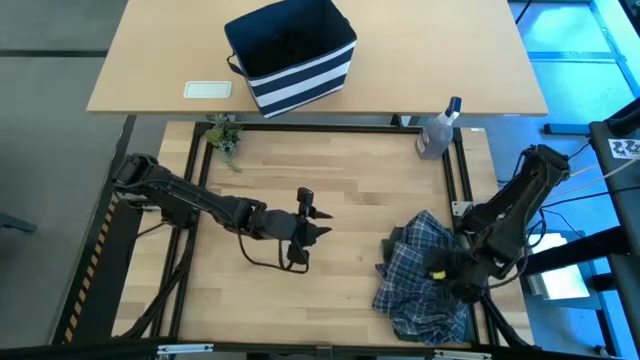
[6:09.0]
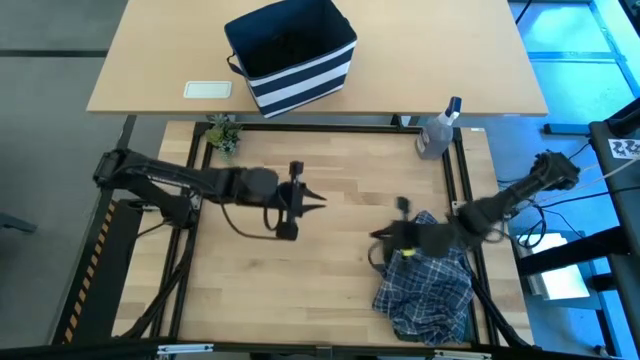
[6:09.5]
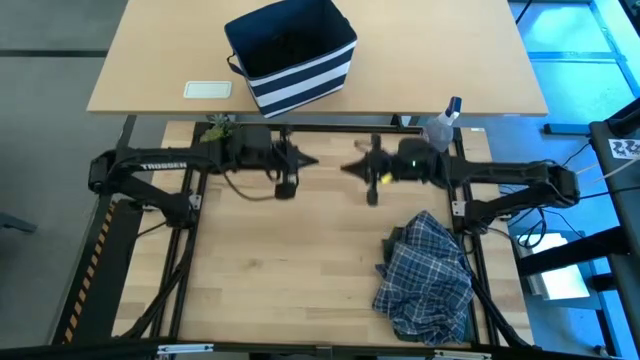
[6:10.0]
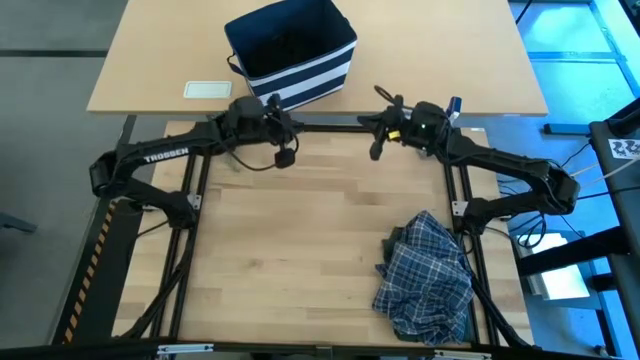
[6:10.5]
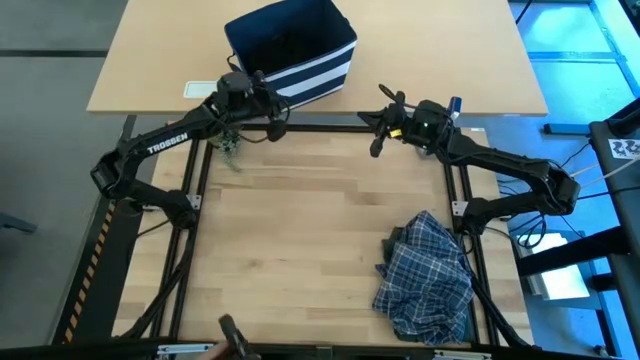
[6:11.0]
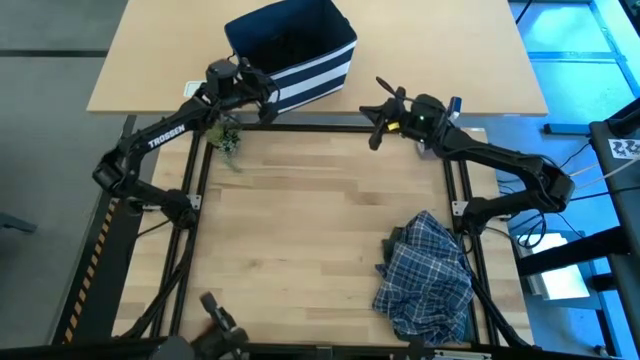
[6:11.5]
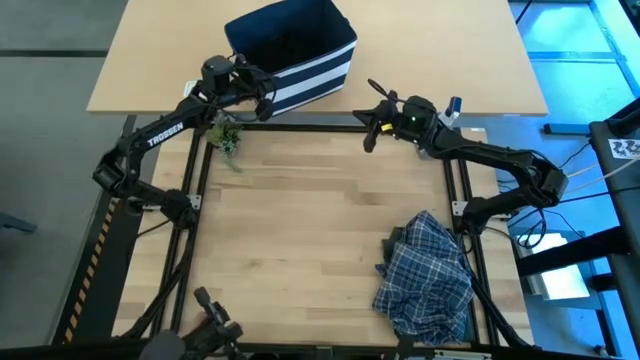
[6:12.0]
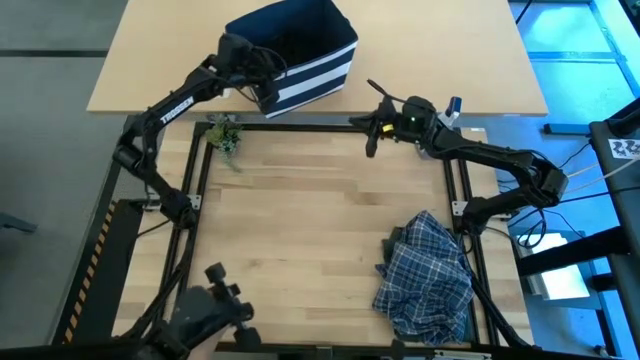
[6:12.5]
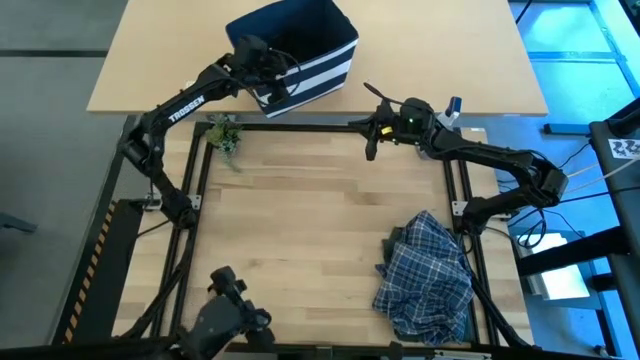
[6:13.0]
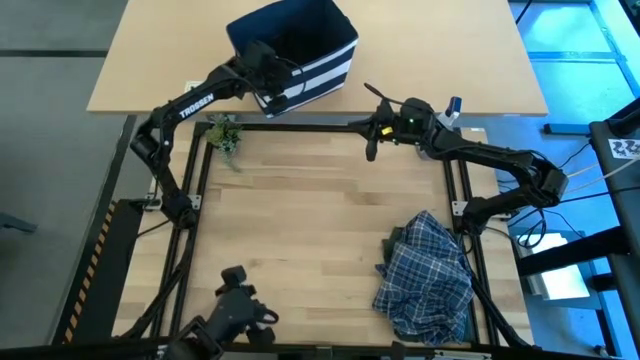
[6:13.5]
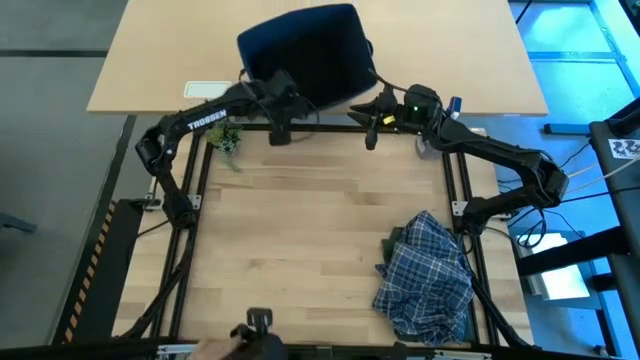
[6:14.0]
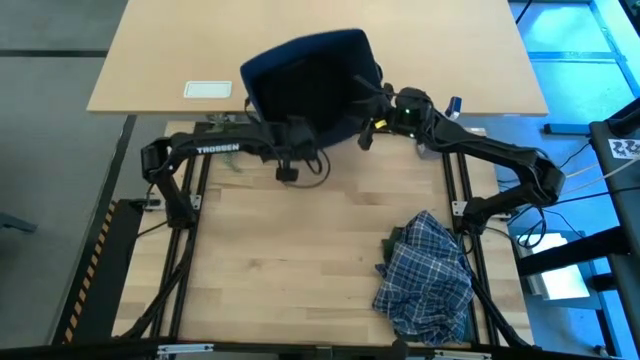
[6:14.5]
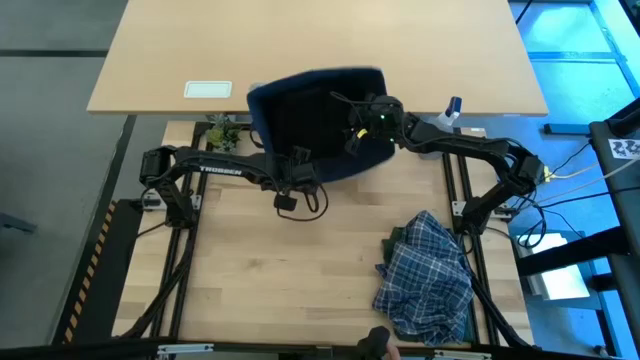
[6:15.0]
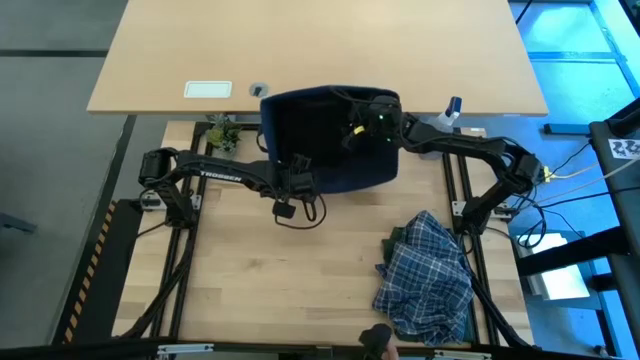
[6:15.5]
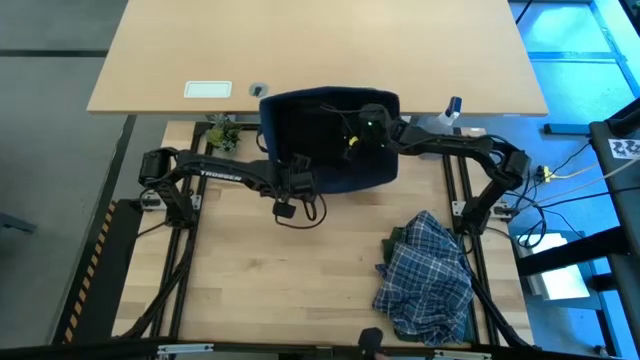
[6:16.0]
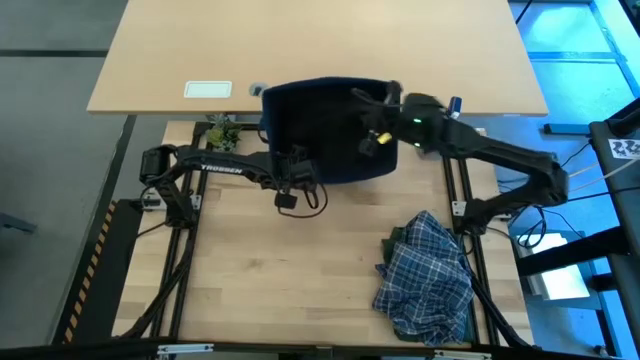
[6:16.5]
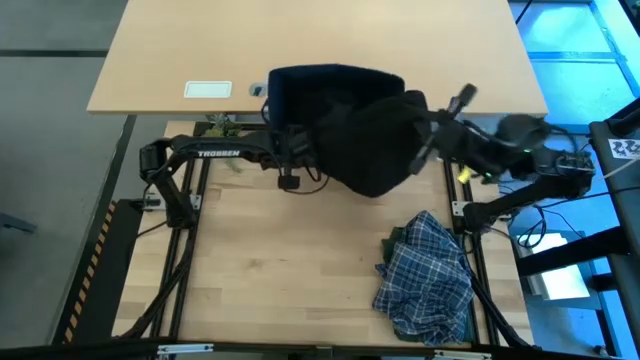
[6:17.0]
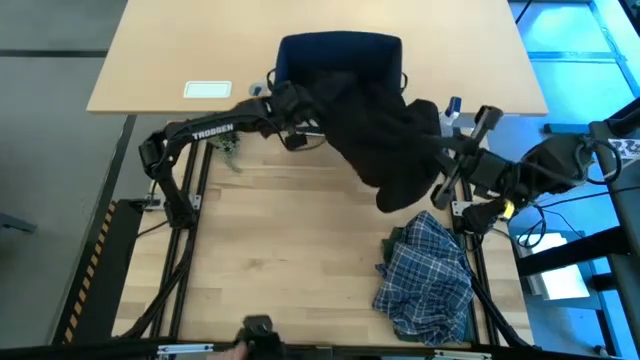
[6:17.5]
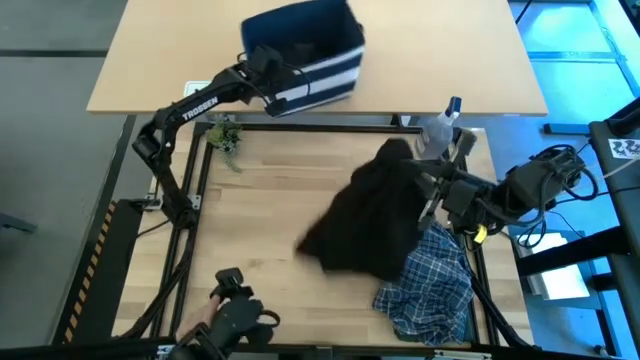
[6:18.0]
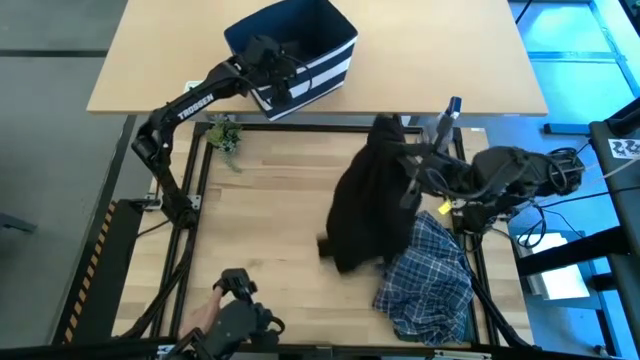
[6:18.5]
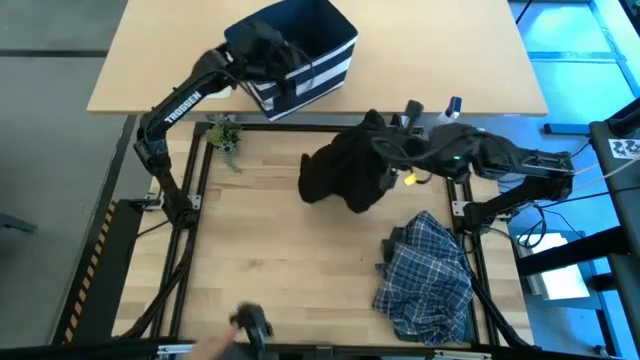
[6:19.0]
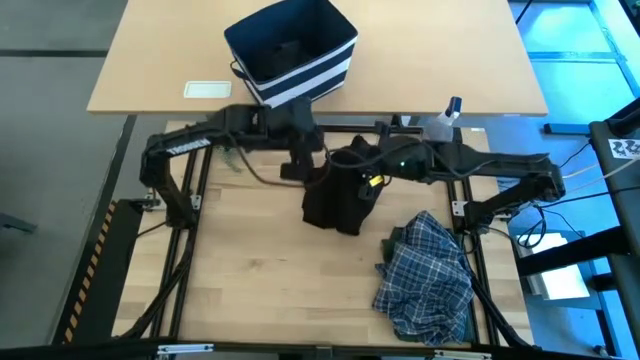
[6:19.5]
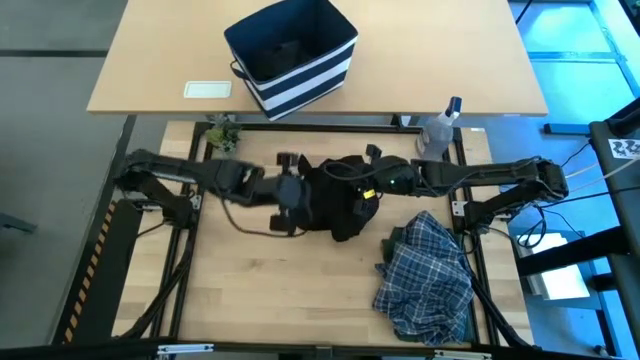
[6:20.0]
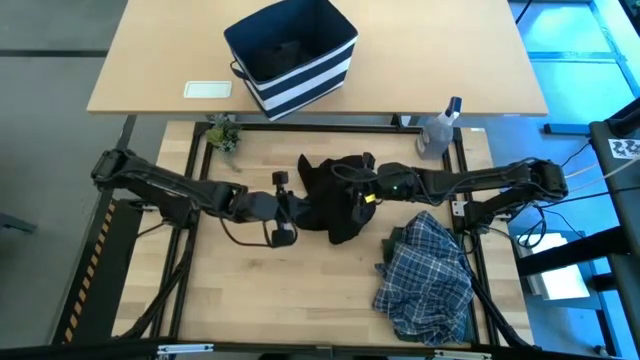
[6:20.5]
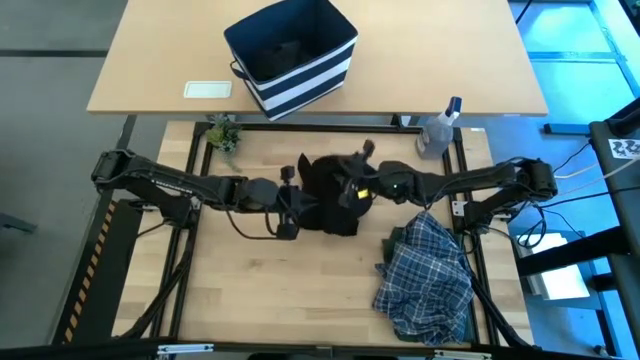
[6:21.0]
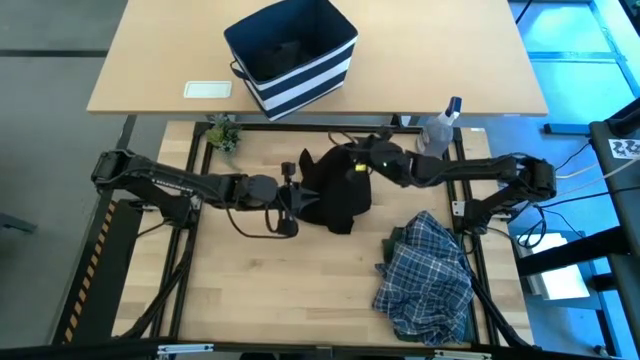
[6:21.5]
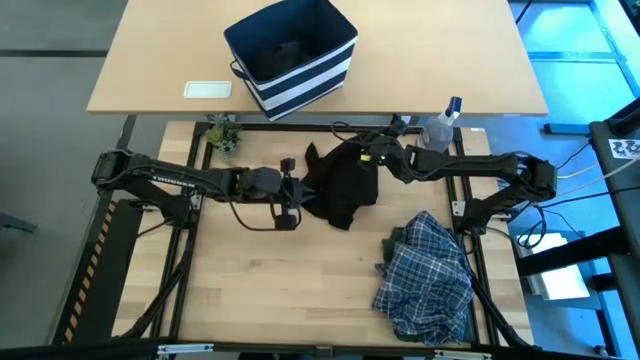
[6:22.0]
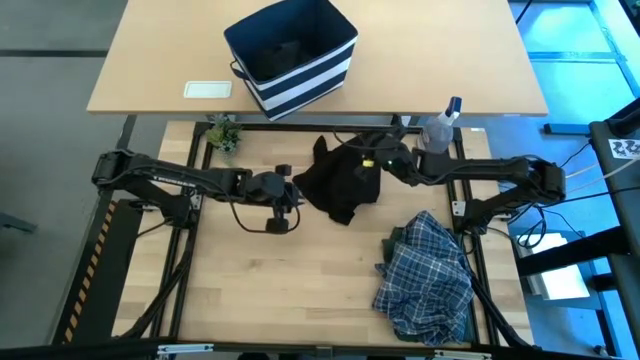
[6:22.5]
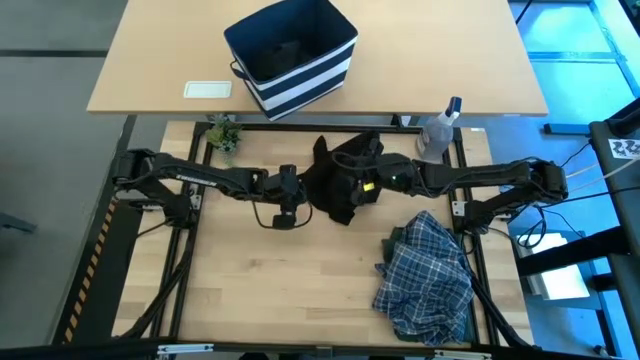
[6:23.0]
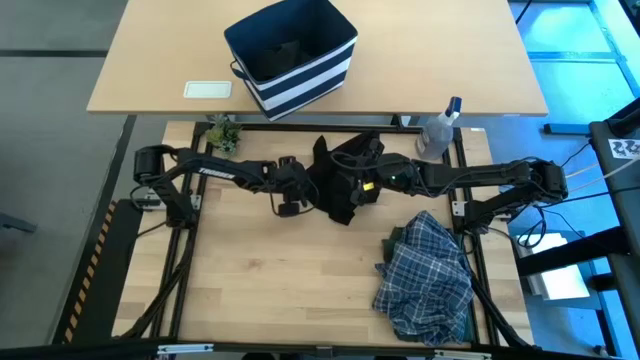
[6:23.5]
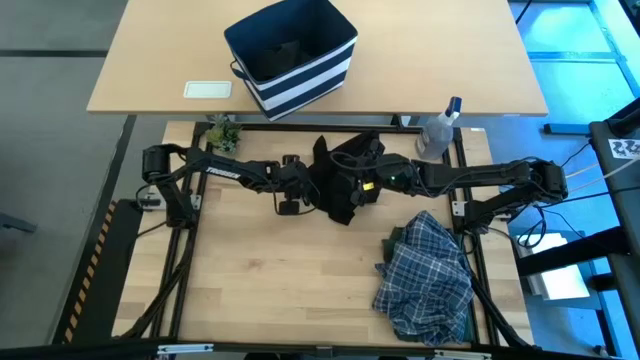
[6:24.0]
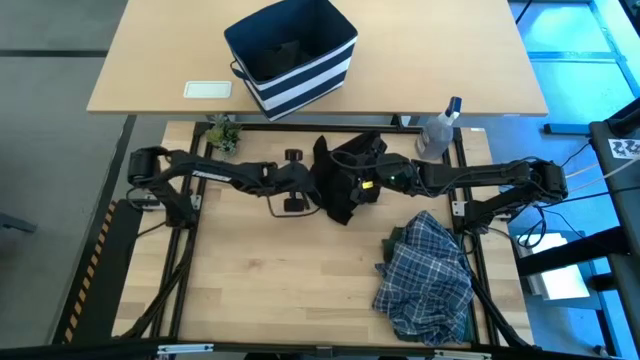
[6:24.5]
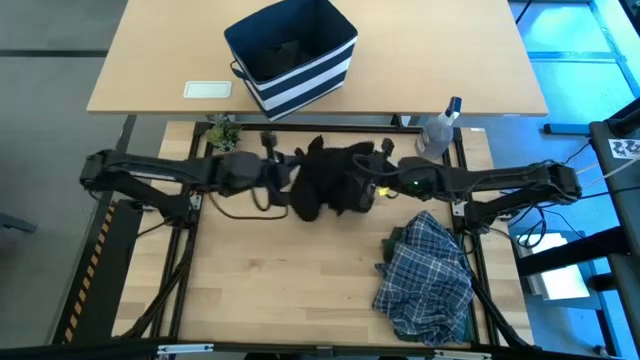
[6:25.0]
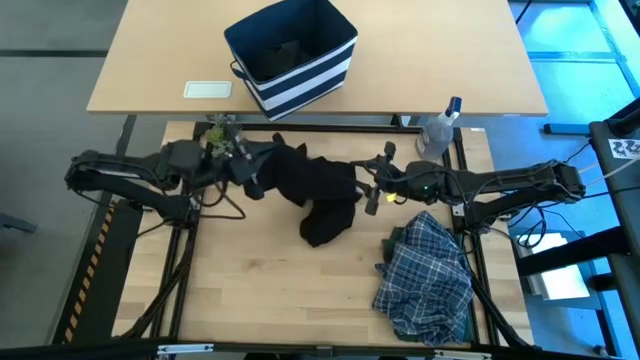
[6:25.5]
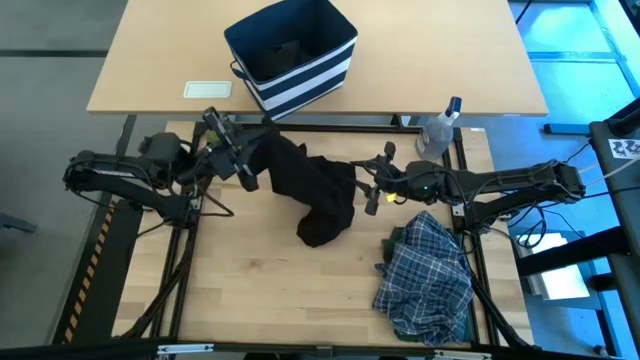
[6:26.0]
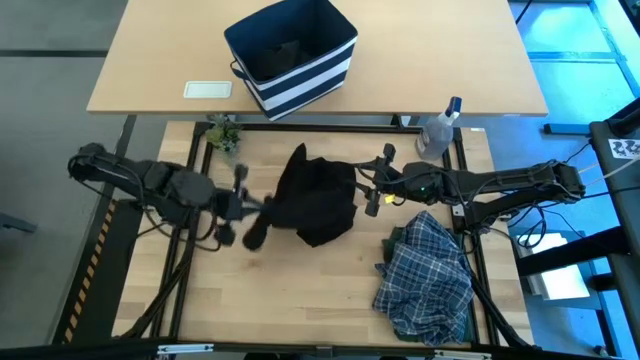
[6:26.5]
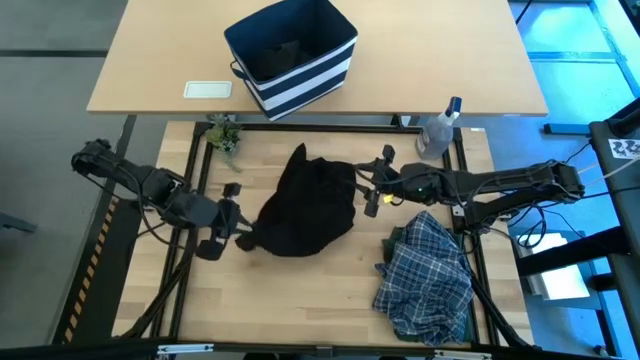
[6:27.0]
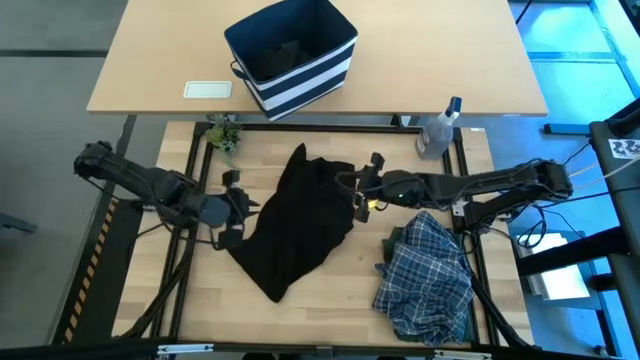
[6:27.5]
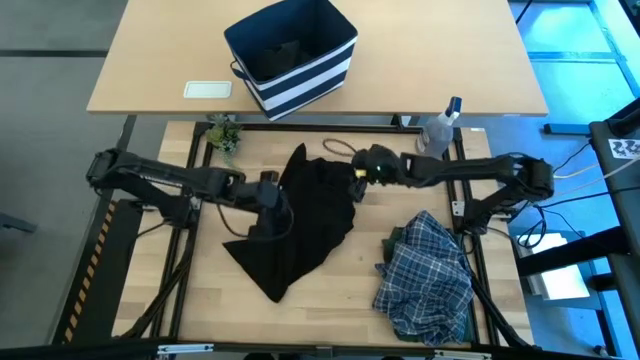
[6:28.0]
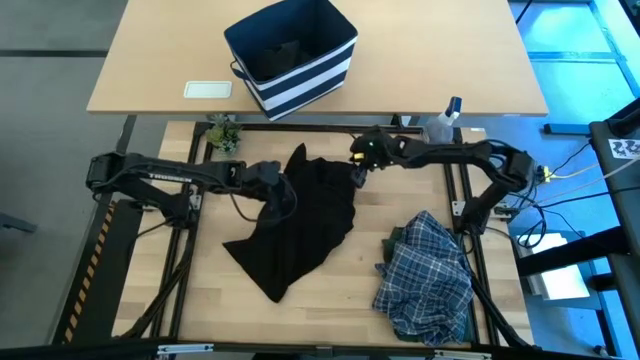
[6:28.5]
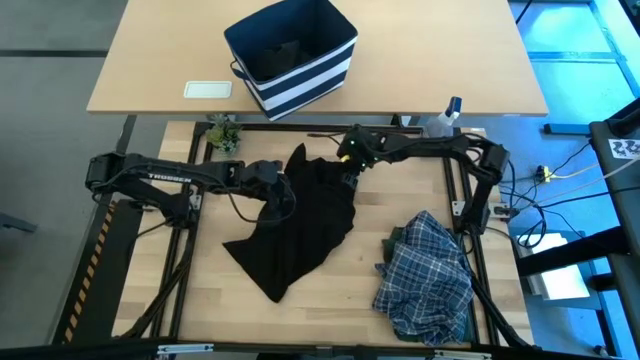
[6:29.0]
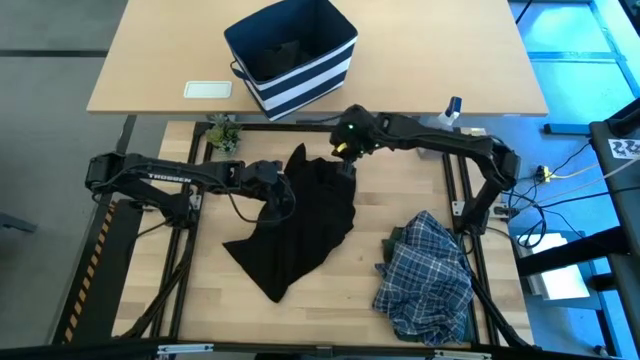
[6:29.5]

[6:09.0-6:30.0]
Task: Fold Laundry from Bin
Fold the black shirt
